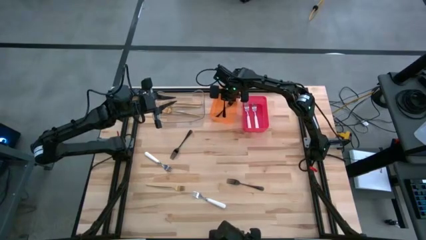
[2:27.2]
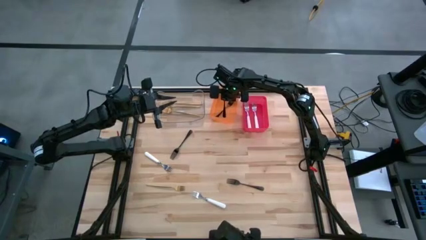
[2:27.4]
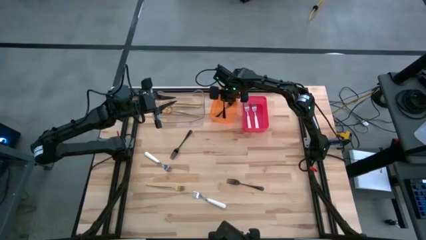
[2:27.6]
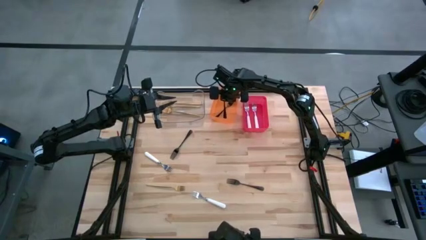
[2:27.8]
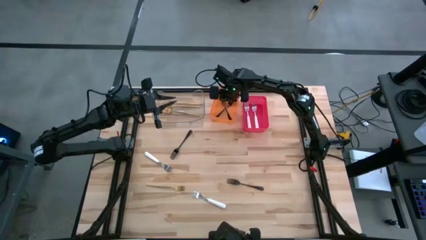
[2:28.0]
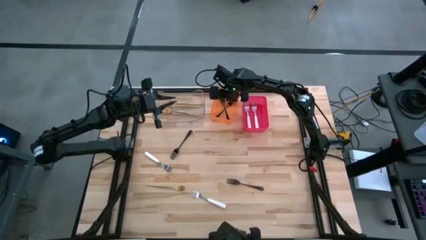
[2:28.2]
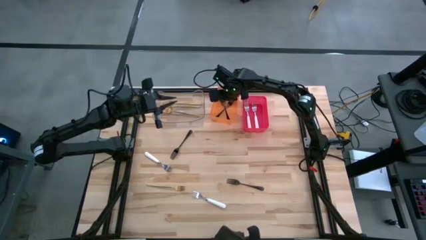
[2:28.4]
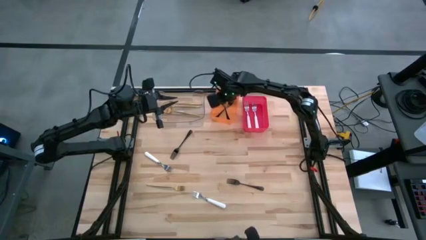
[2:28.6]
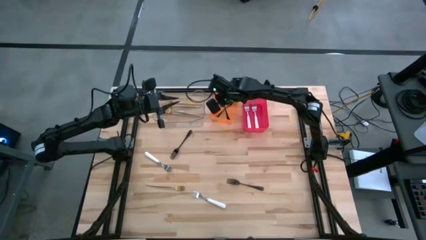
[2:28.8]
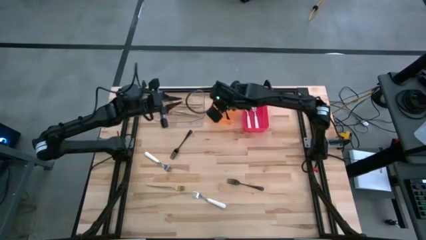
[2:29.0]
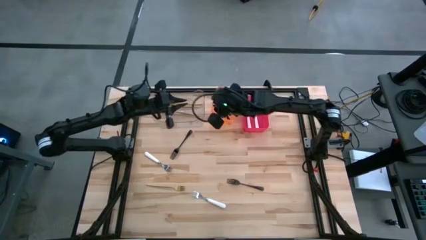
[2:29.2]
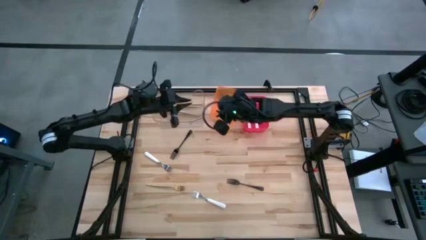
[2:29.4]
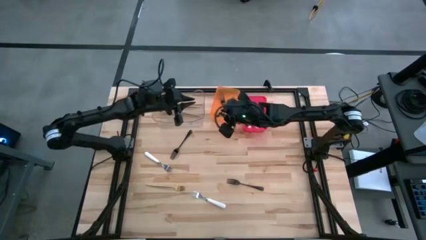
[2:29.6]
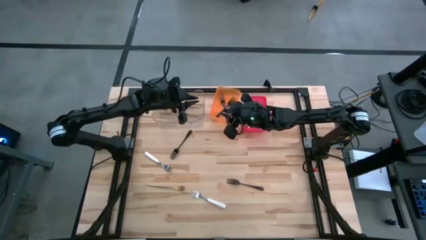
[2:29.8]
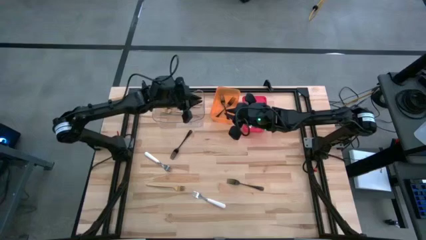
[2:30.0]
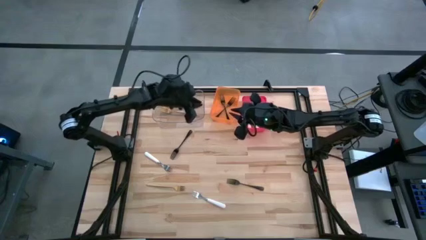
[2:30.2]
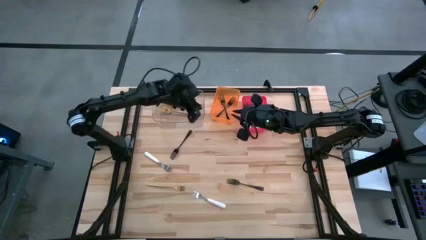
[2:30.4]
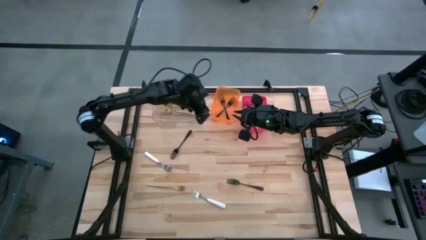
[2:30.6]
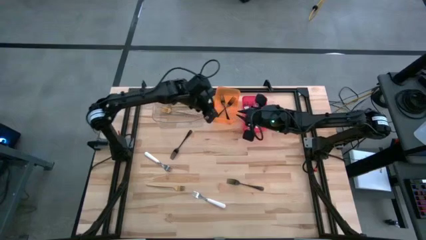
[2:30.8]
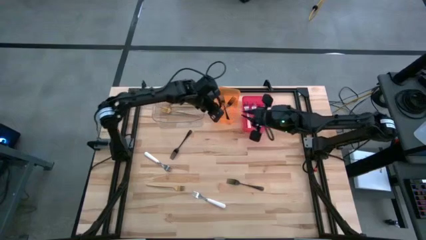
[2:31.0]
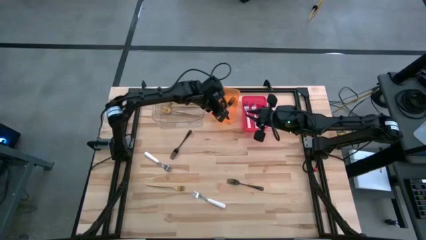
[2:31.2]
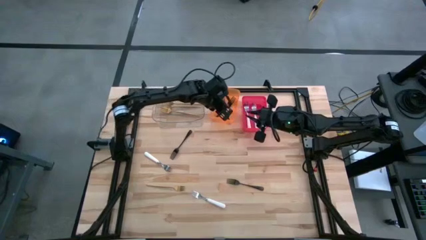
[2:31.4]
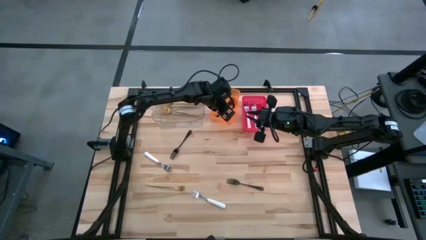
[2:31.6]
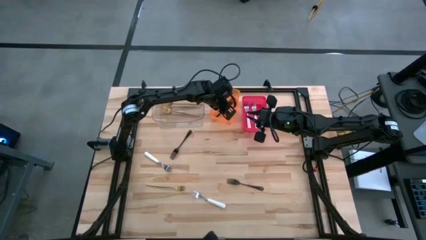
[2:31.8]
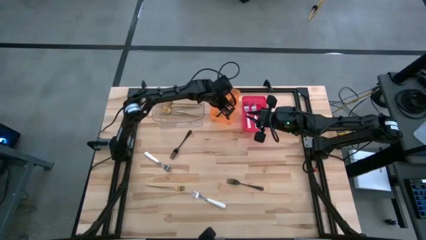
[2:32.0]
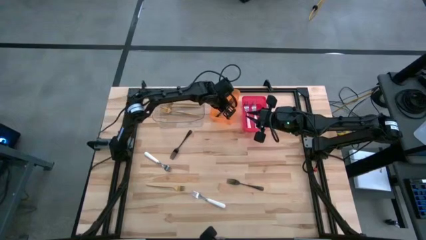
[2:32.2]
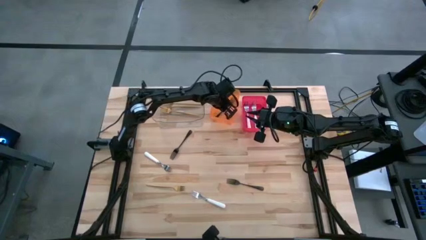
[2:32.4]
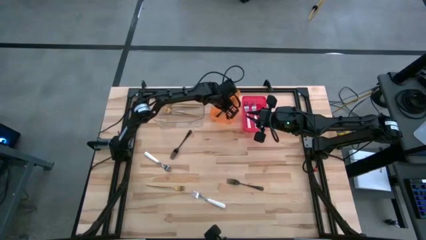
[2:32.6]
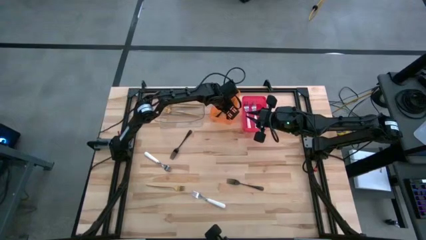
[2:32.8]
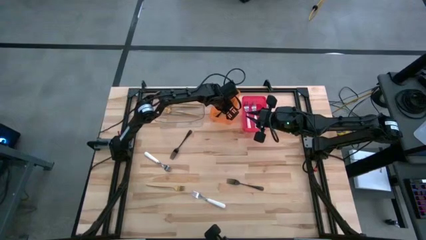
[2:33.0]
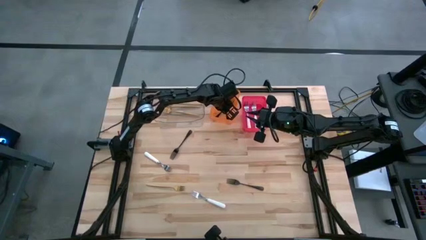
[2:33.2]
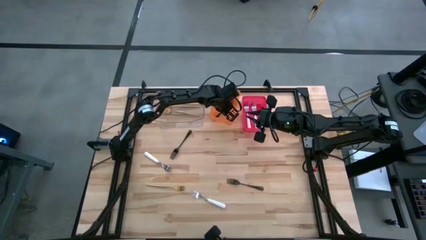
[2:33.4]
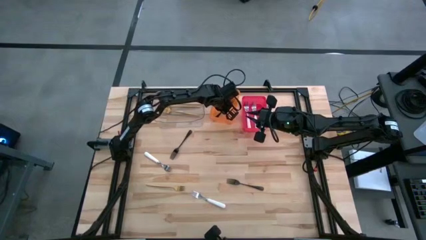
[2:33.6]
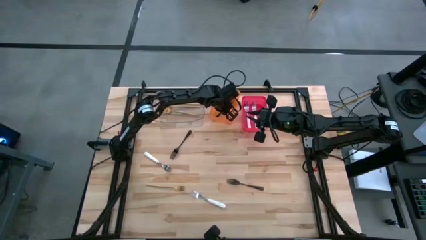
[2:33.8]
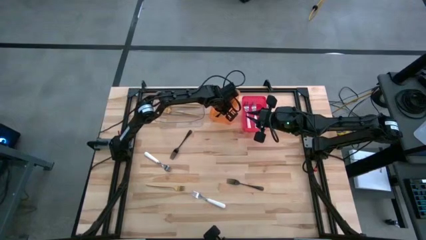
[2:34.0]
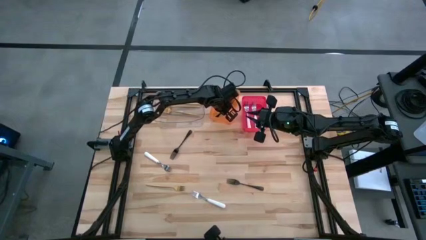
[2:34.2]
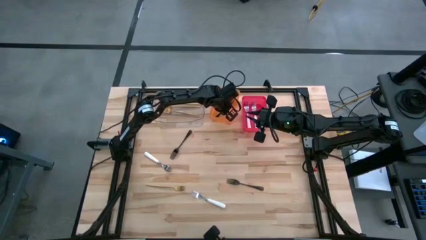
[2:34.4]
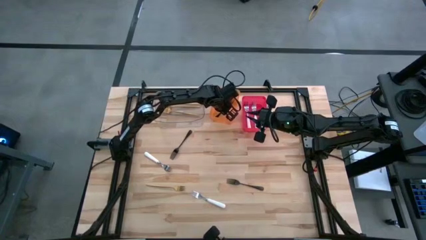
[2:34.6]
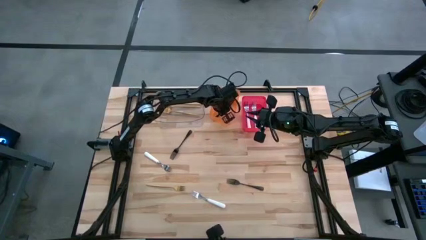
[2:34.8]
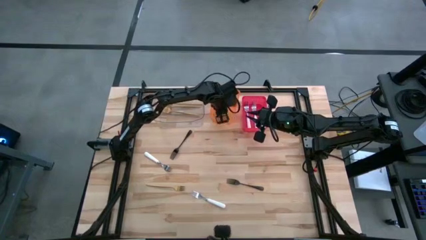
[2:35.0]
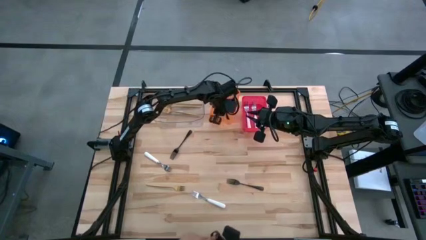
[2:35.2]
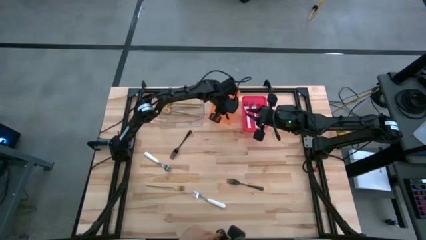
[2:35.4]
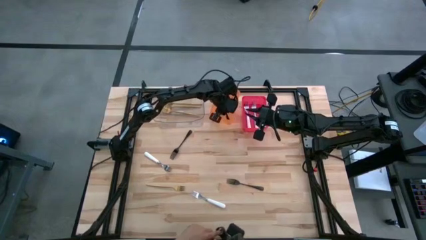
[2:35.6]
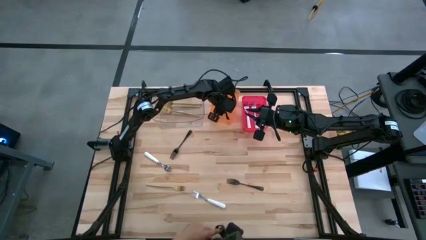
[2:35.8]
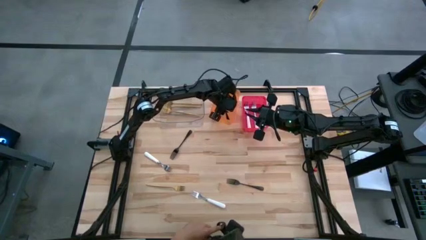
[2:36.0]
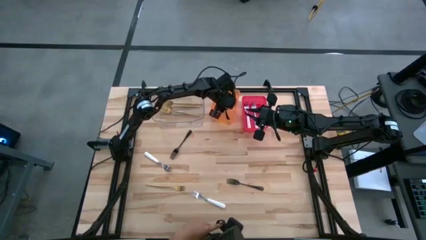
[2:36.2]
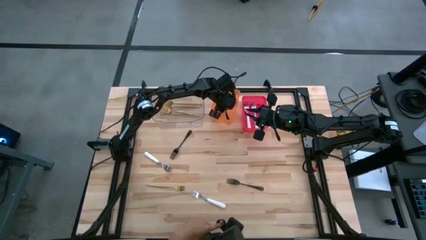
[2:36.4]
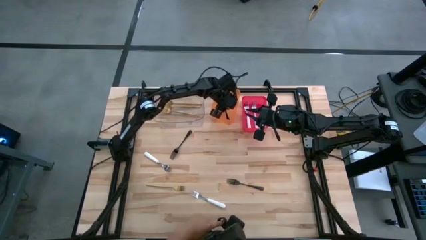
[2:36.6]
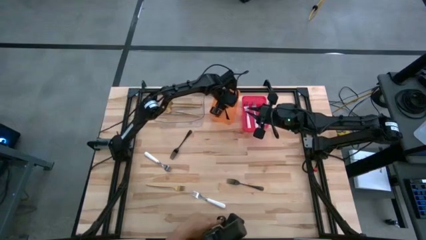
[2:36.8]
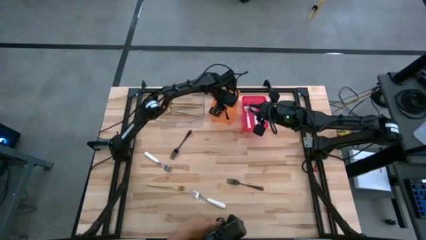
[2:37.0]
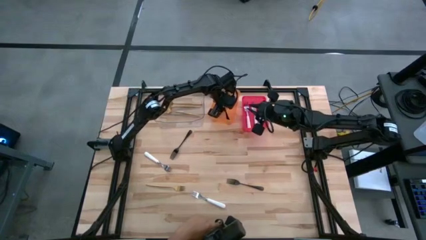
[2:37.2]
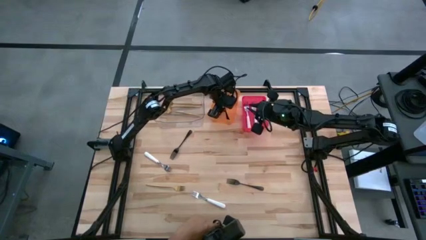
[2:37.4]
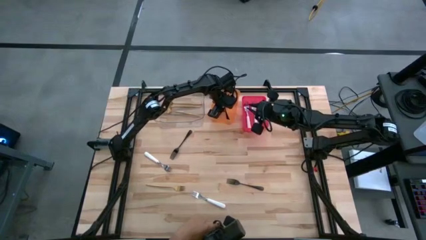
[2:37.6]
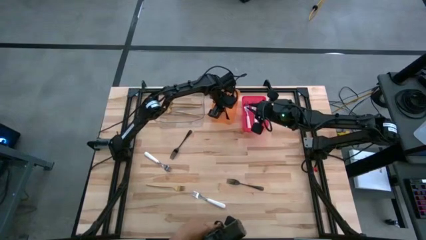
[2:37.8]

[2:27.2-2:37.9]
Task: Sort silverware by color (type)
Put the black fork into the orange bin
